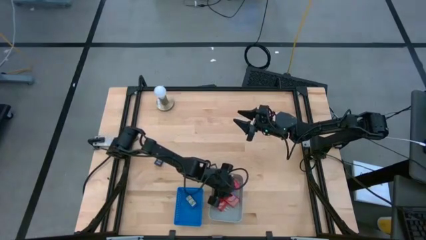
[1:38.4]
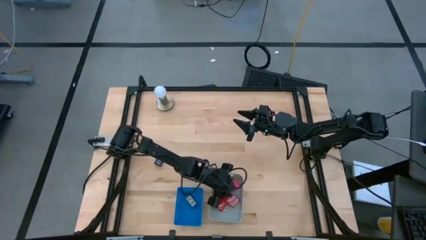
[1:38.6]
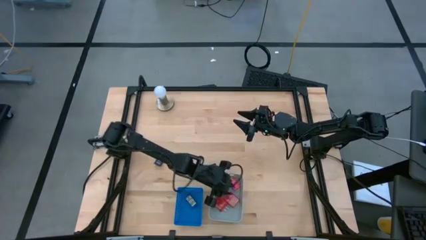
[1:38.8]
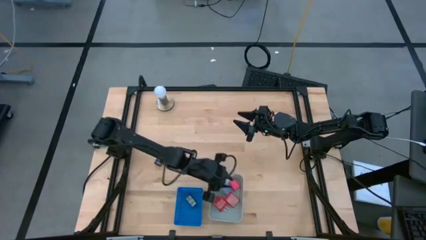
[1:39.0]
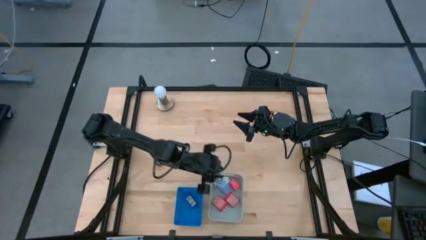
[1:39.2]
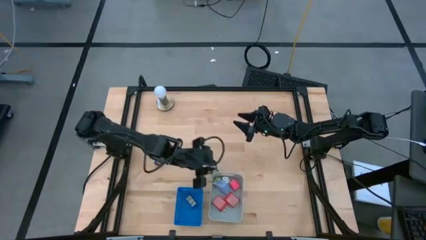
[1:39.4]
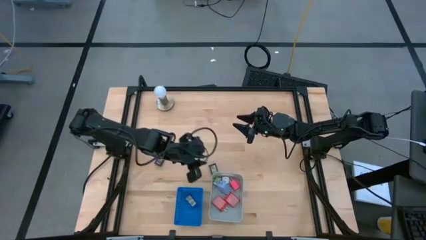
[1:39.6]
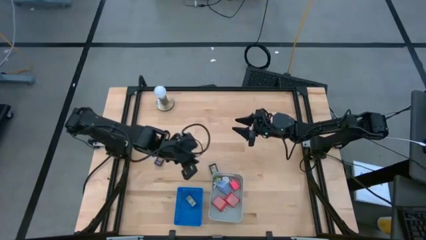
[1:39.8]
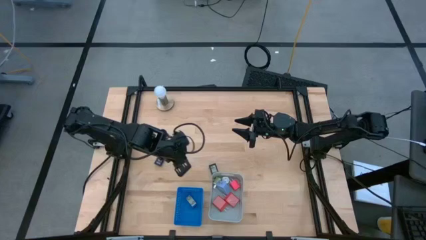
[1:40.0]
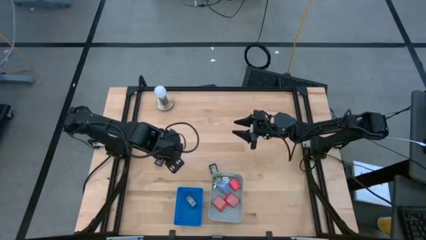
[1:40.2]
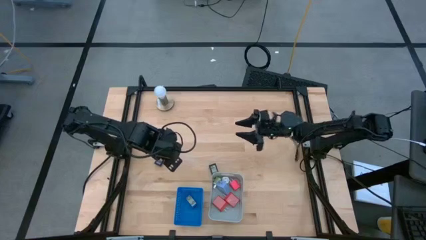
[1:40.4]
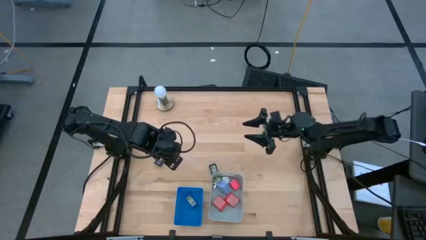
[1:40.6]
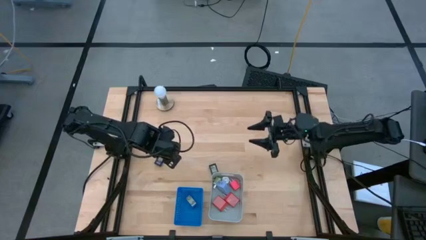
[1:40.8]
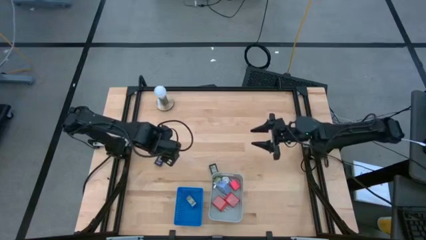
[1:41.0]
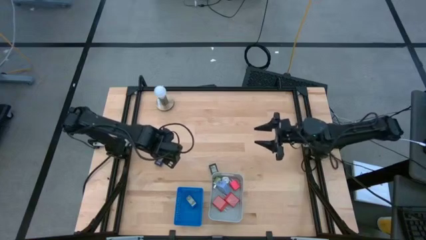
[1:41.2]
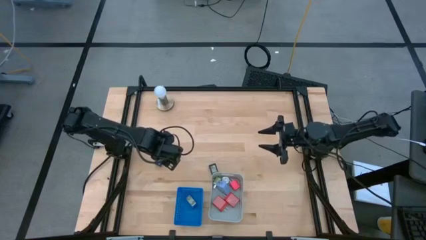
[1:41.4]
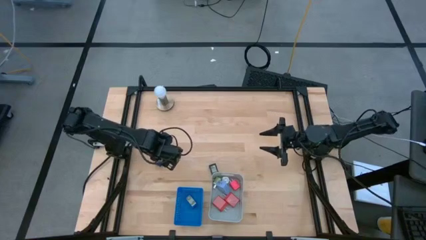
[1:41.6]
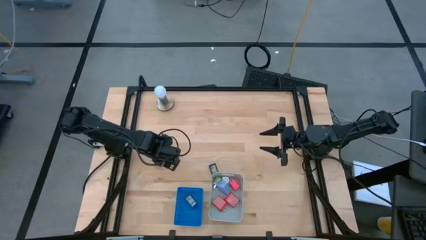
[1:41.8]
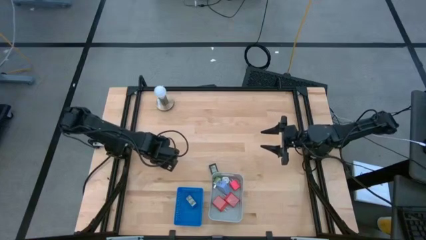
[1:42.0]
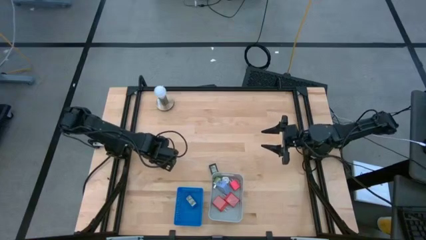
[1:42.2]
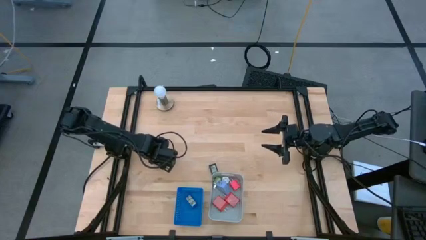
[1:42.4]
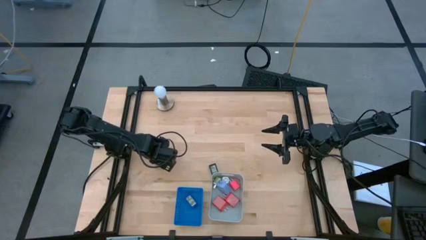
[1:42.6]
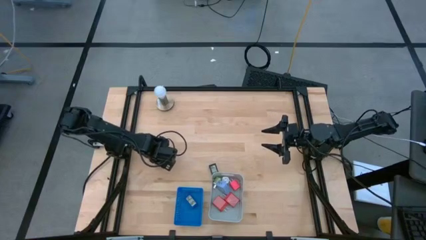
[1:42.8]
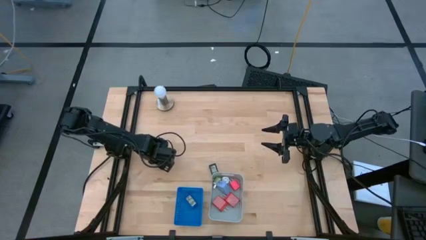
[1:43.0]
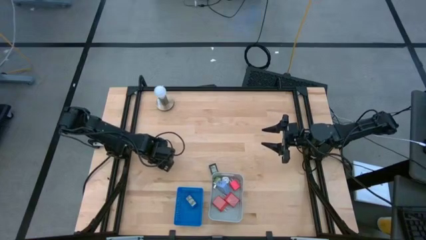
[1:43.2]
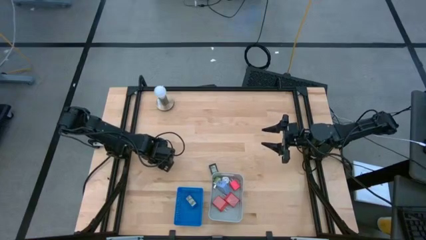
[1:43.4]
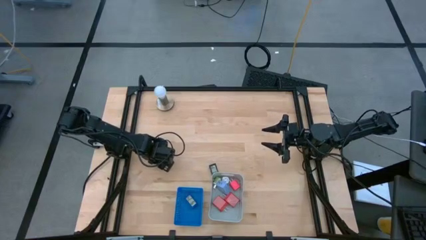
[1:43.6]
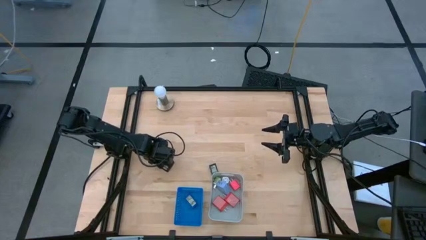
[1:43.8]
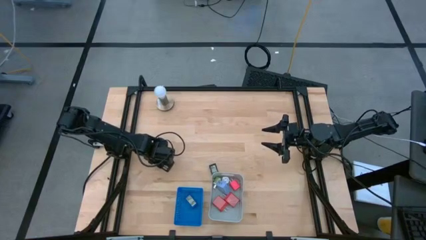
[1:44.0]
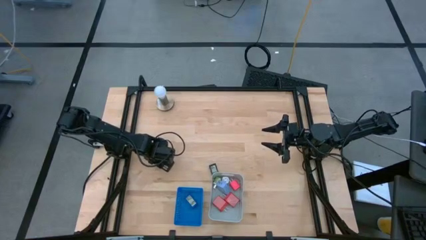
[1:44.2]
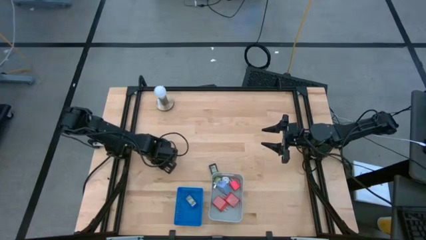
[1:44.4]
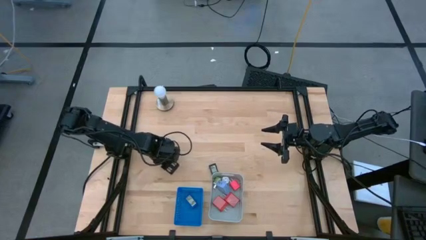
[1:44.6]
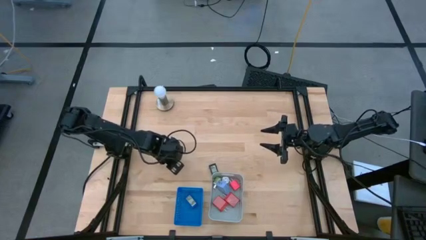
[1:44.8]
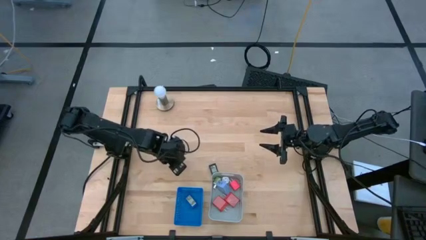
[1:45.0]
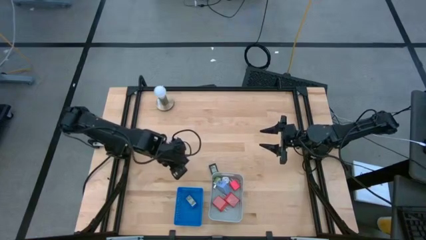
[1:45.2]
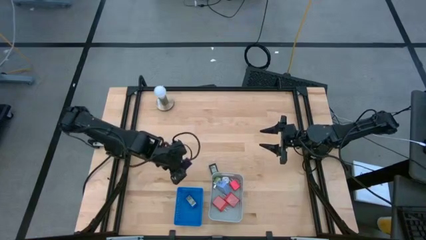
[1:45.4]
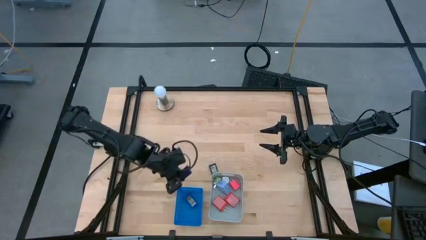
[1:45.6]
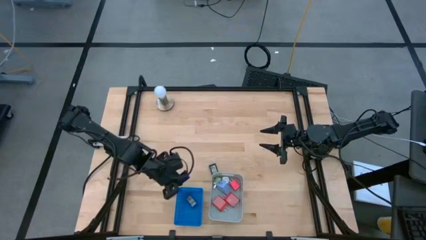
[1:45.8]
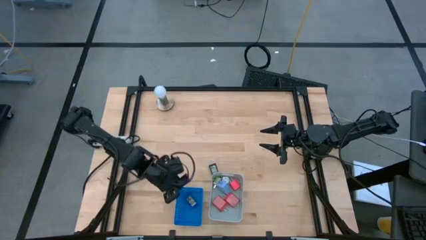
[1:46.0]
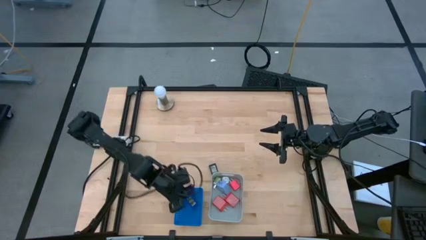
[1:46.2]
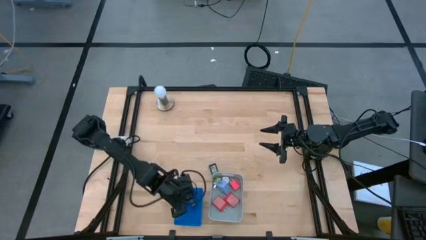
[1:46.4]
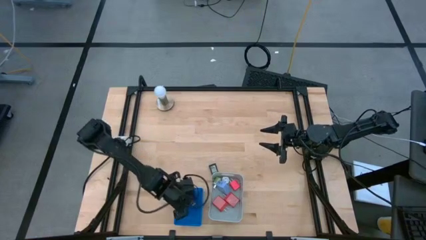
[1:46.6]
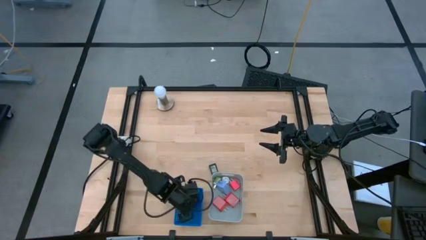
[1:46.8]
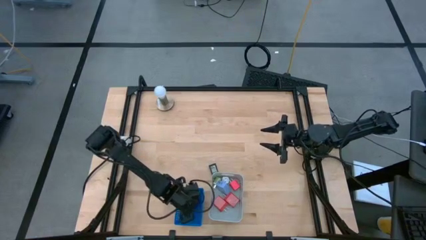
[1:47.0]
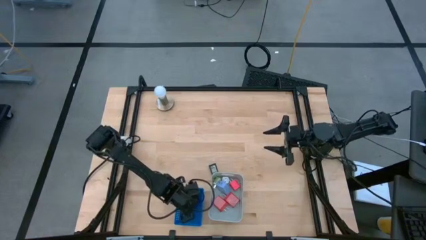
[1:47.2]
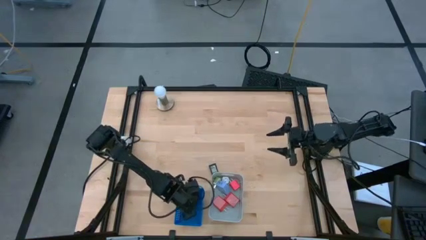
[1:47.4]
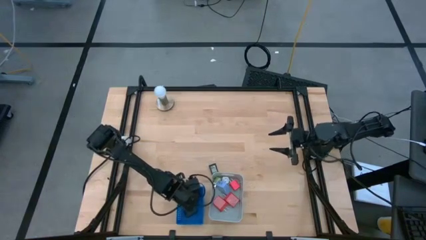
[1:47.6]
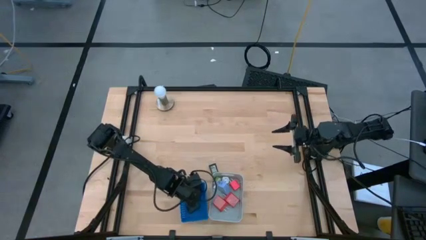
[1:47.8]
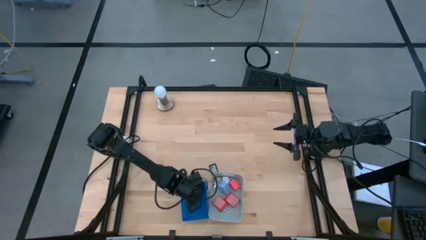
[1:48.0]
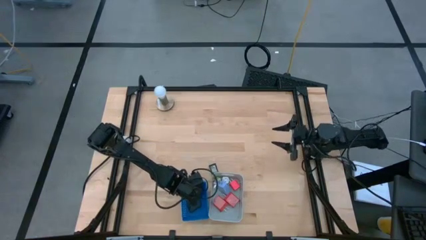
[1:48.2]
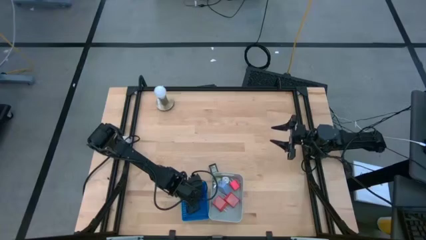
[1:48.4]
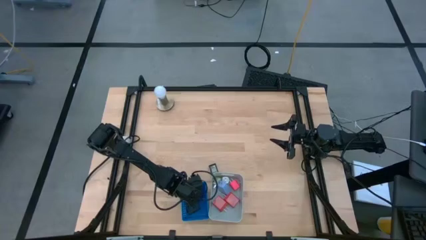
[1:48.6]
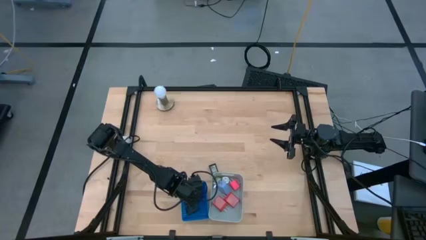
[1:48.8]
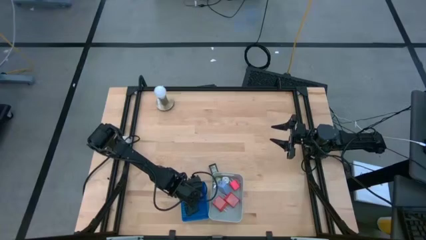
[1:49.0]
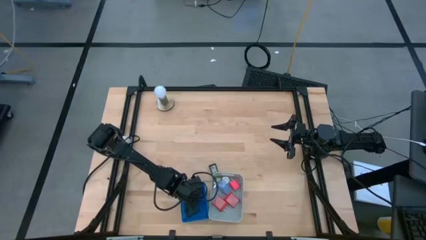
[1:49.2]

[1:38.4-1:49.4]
Task: Pick & Place Office items
Put the violet digital clock into the blue bin

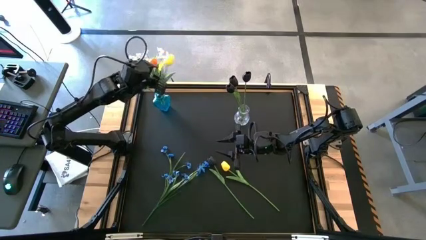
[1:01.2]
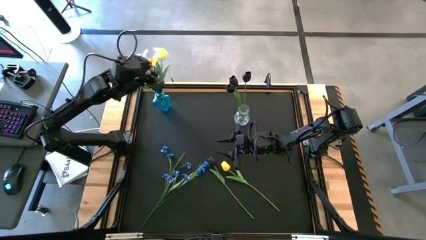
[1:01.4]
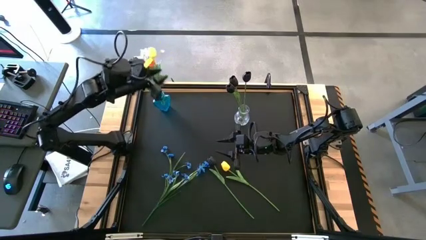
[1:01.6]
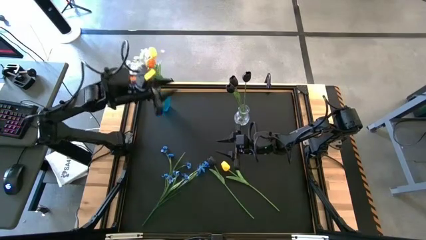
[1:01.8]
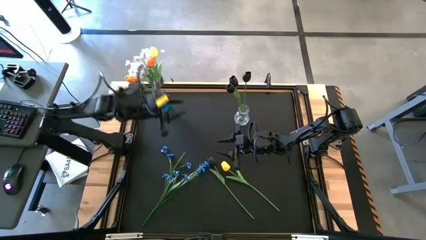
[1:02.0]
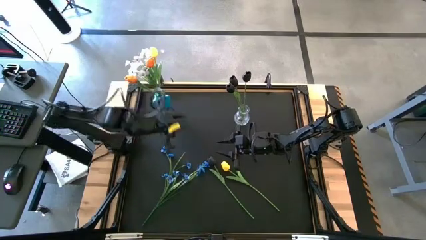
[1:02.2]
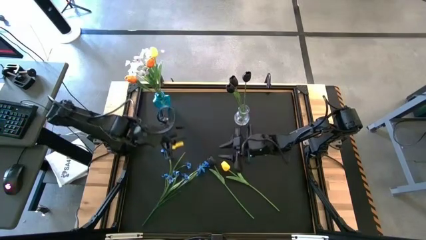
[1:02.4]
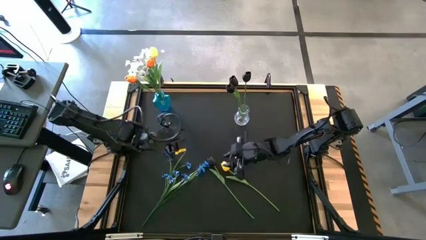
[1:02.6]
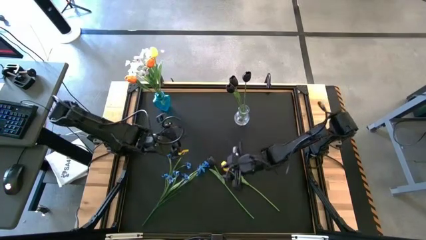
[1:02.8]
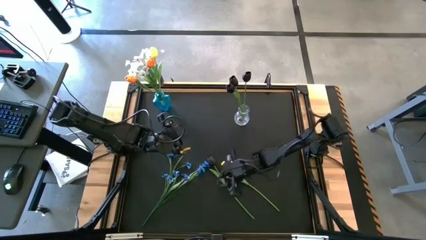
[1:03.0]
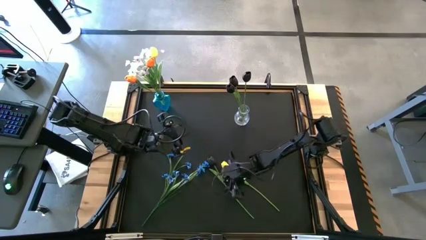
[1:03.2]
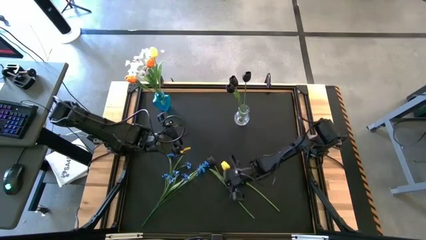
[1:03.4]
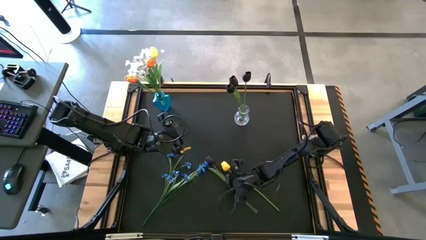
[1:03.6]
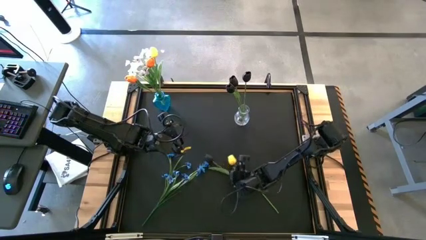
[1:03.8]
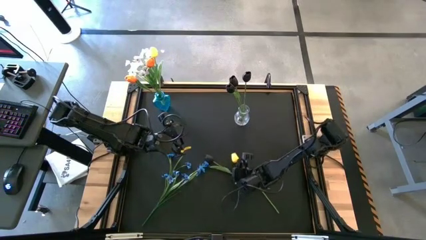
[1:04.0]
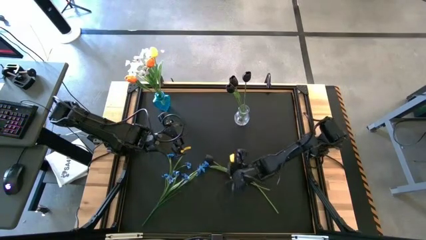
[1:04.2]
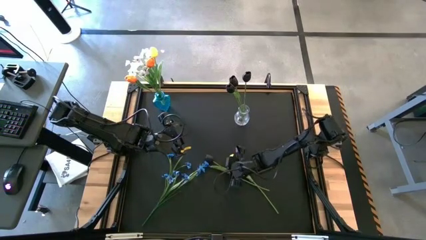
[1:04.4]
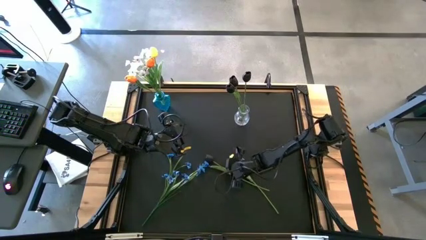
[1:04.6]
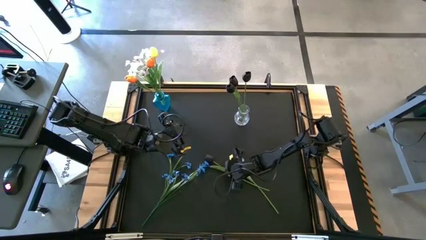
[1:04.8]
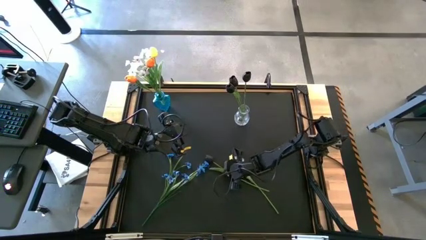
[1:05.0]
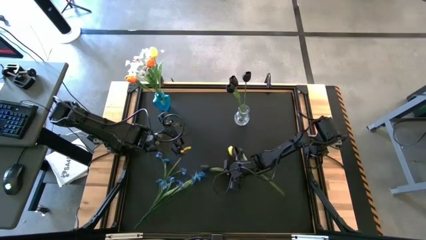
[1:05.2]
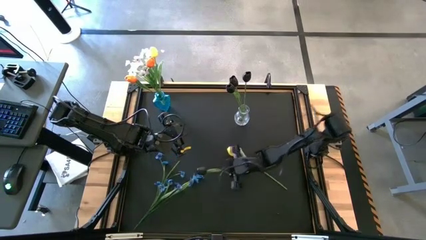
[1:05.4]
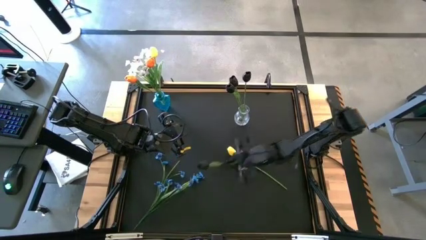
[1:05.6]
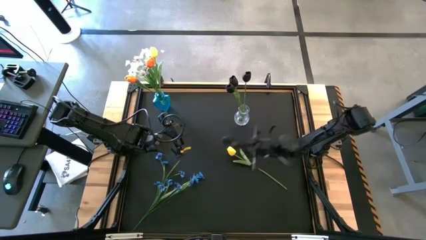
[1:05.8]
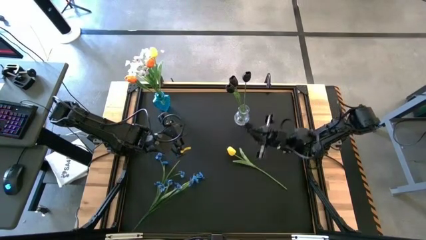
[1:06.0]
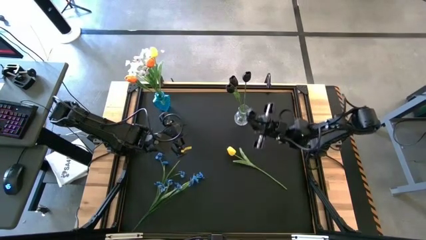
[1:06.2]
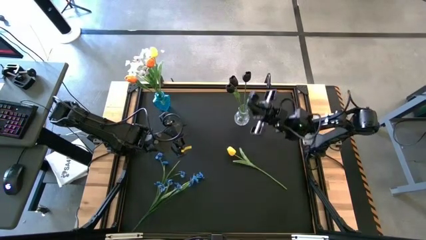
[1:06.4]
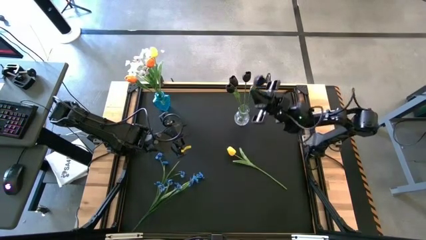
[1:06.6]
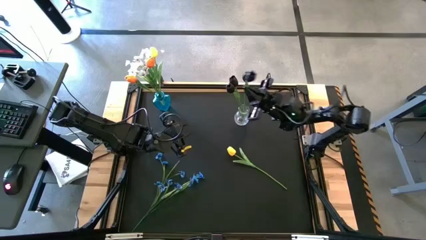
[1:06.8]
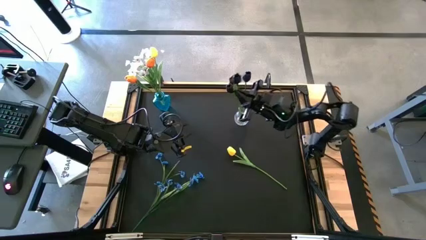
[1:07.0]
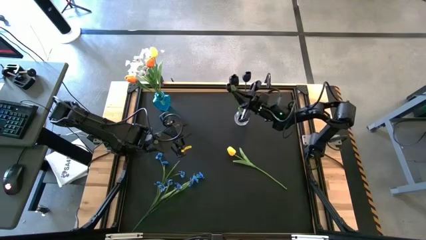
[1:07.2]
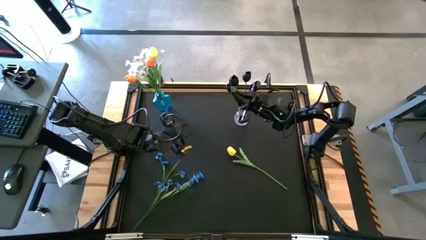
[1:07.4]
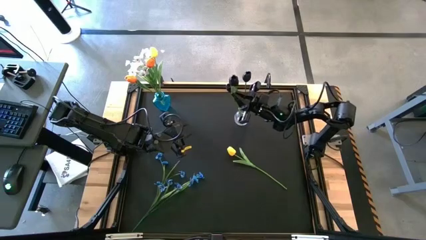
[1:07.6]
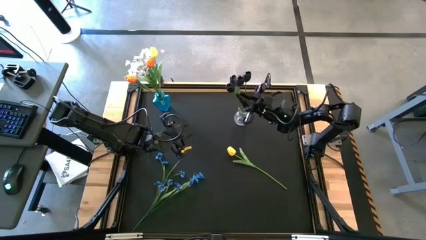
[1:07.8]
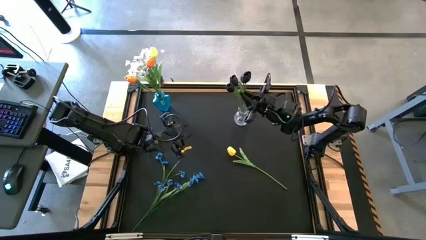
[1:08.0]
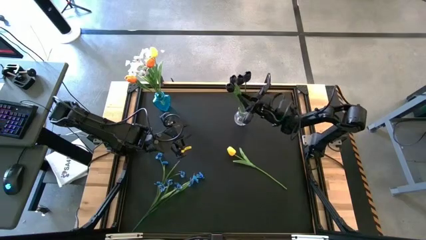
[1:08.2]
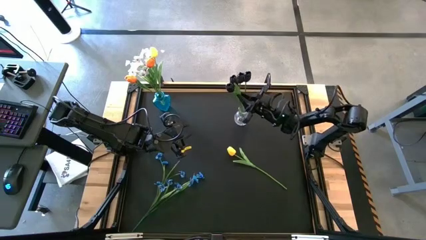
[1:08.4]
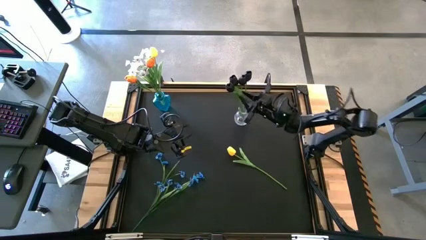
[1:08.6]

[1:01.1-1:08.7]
Task: Sort flowers into vase by color
Put the black flower into the transparent vase
